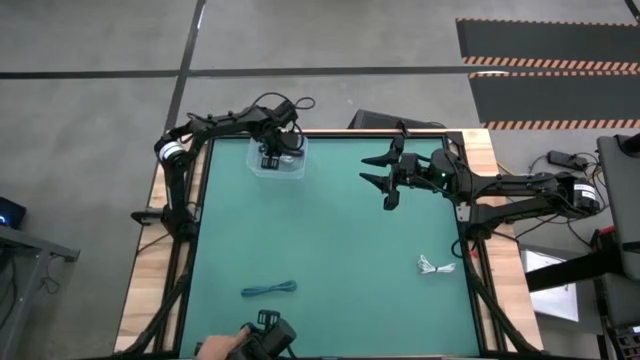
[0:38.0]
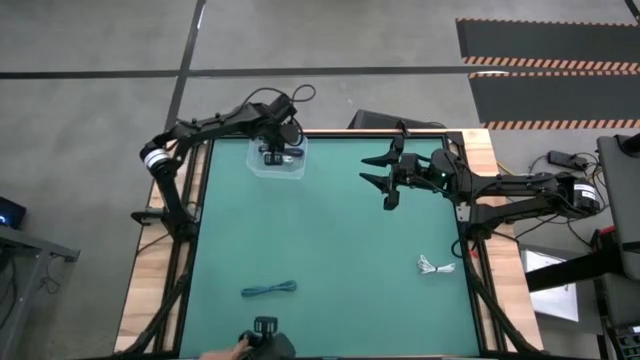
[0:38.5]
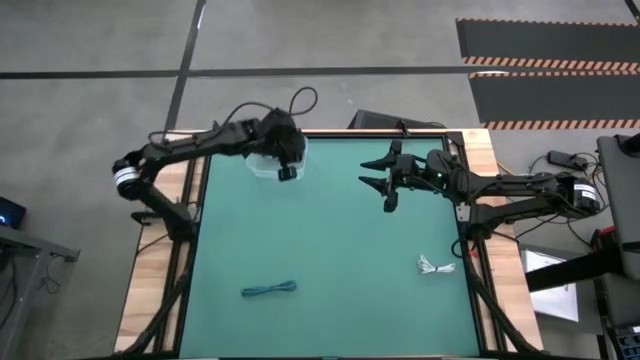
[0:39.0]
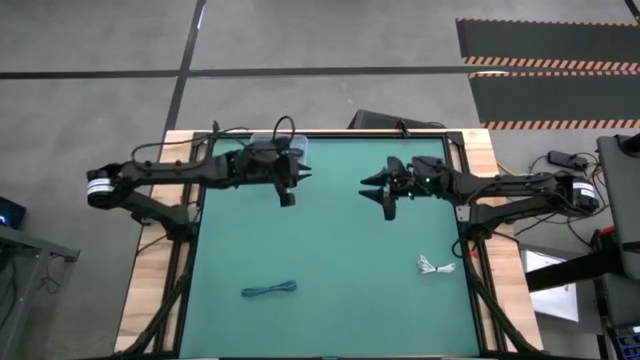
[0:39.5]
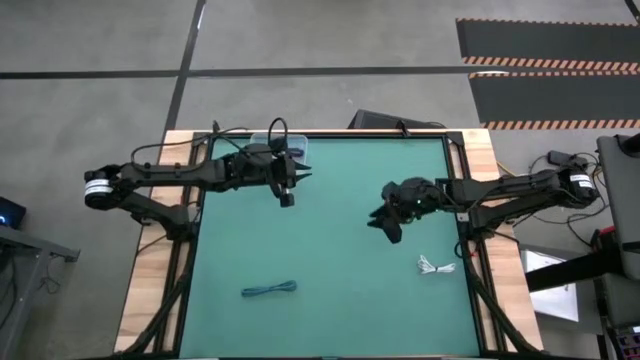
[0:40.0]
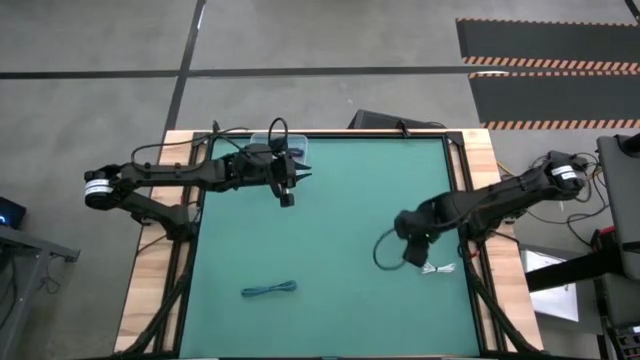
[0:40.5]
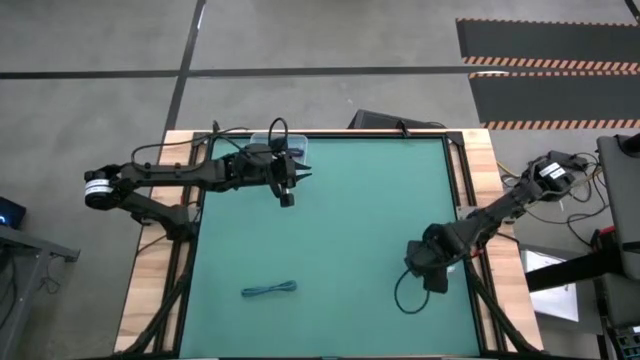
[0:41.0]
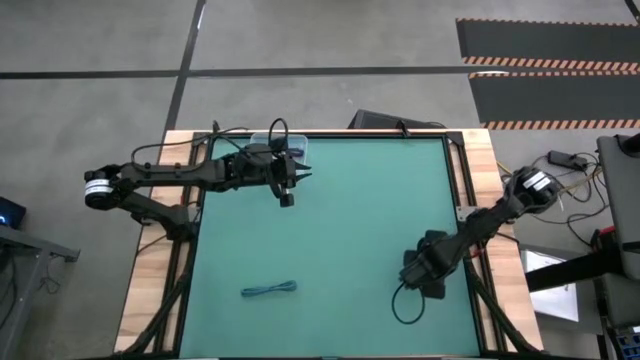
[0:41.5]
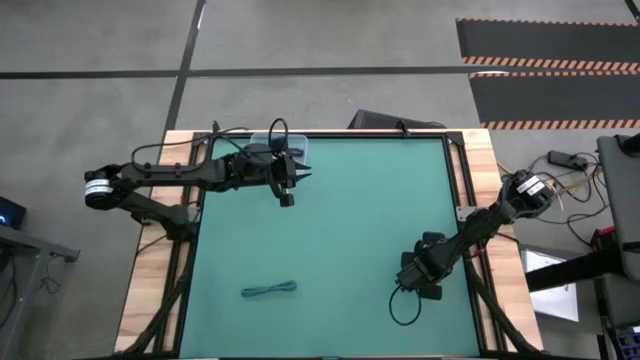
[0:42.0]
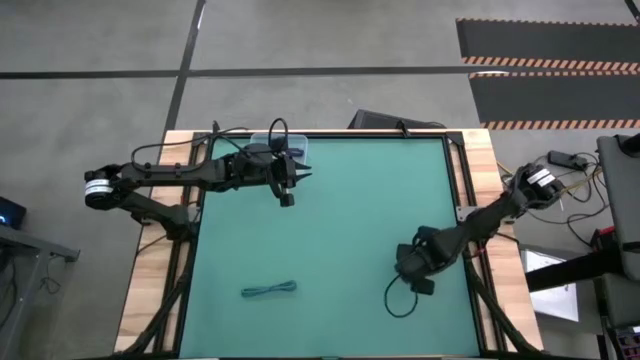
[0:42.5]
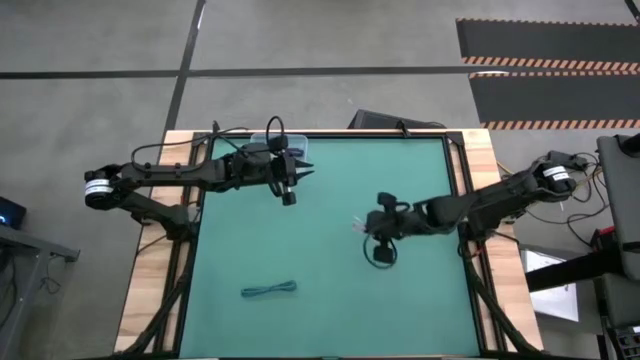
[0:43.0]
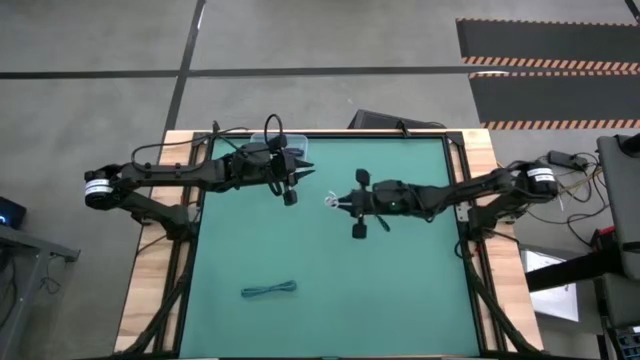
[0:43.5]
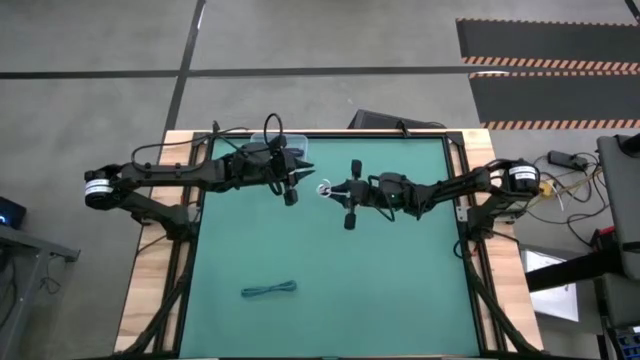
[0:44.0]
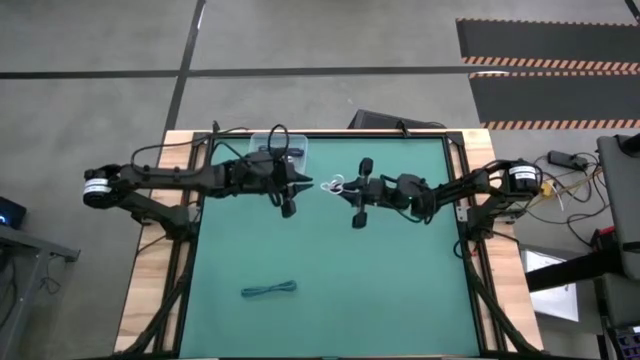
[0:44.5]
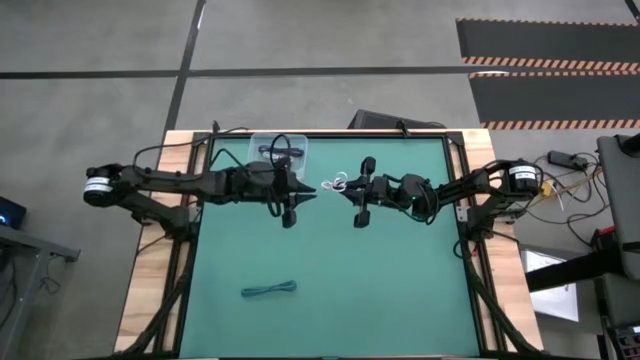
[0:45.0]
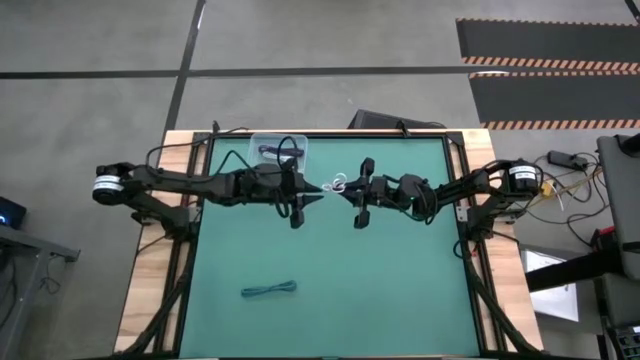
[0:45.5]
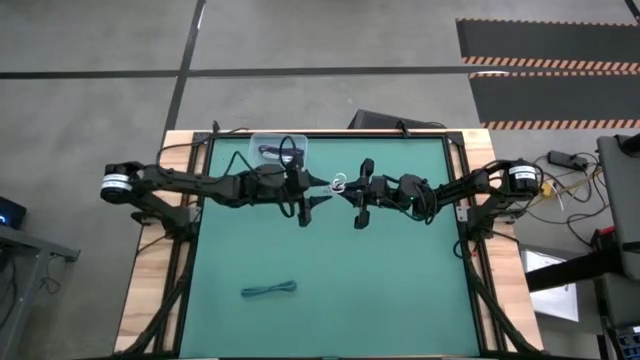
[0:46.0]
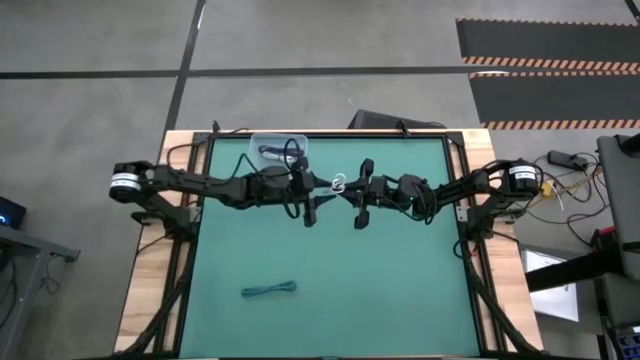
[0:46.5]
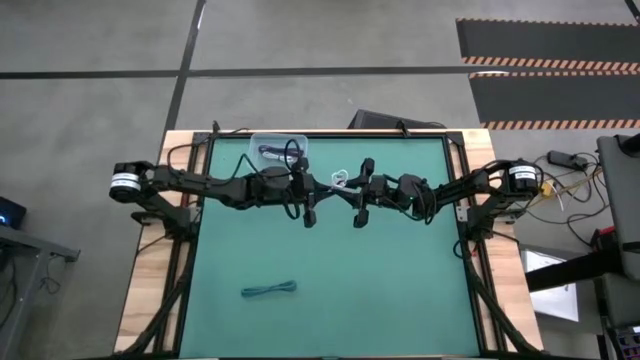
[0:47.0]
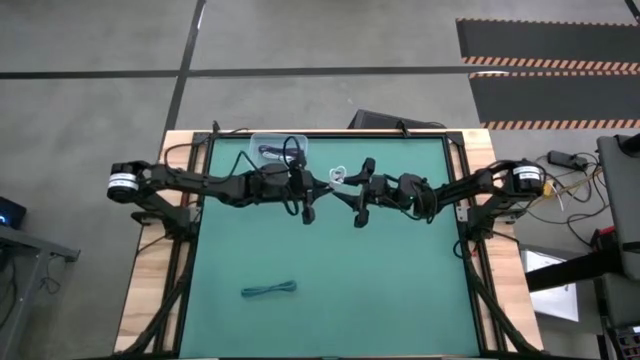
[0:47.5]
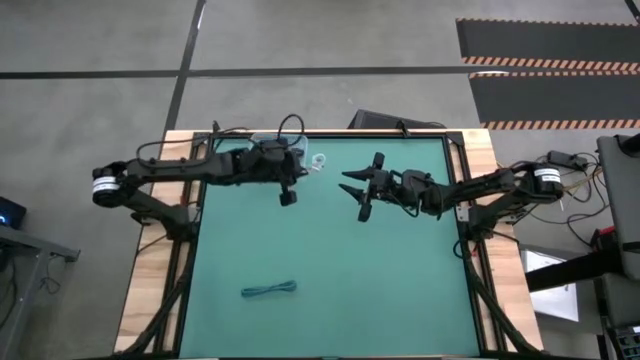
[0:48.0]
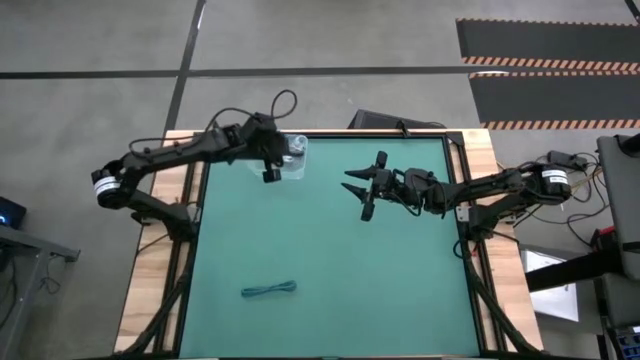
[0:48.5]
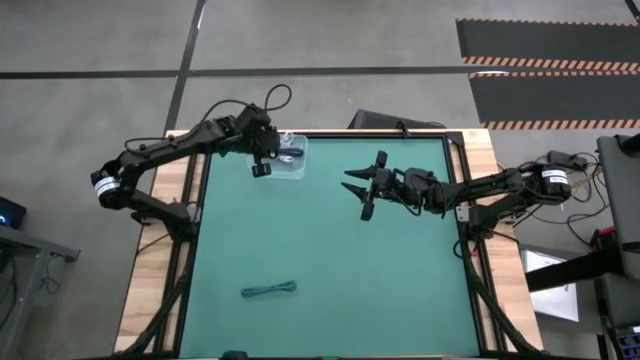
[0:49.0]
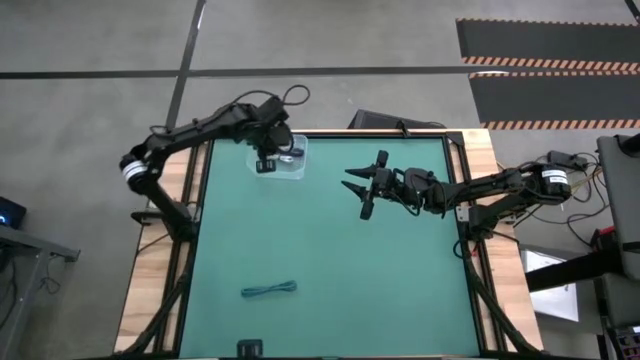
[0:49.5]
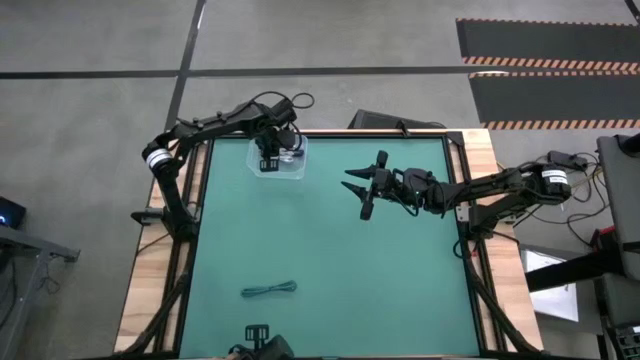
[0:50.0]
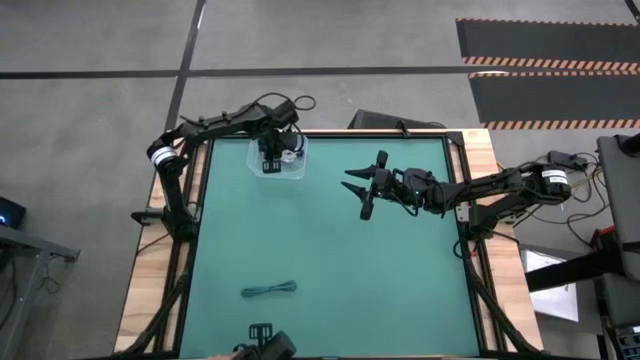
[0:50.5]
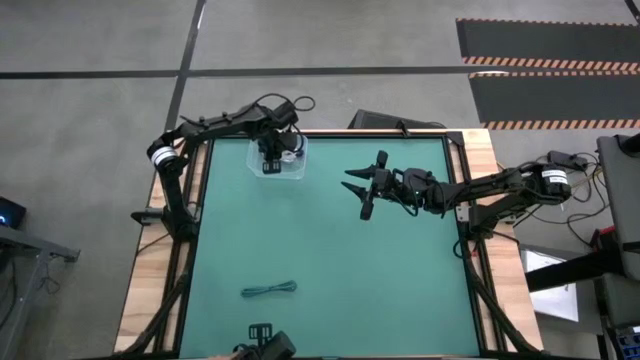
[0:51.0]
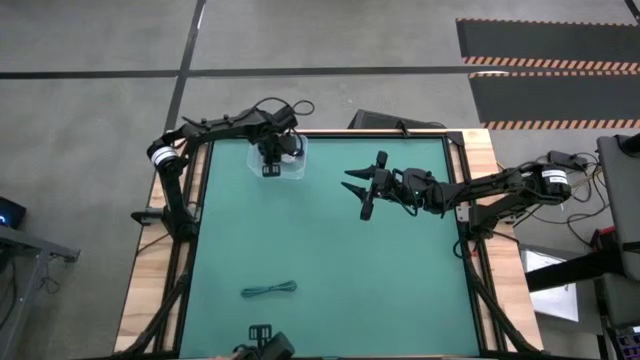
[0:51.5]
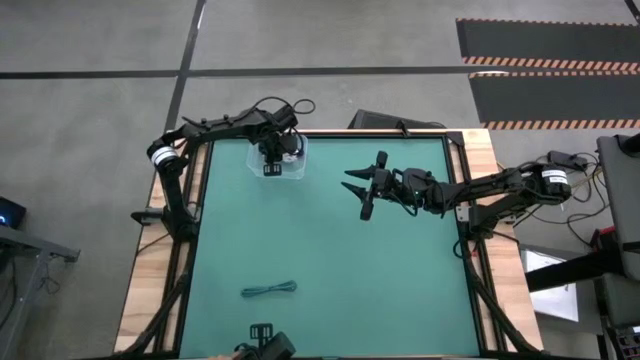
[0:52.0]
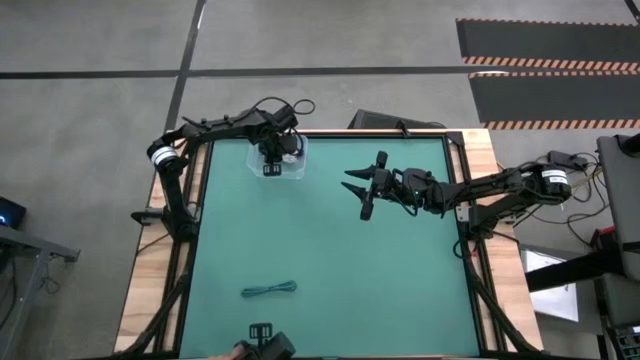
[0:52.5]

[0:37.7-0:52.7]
Task: Pick and place USB-C Cables
Put the white charger cable into the transparent bin

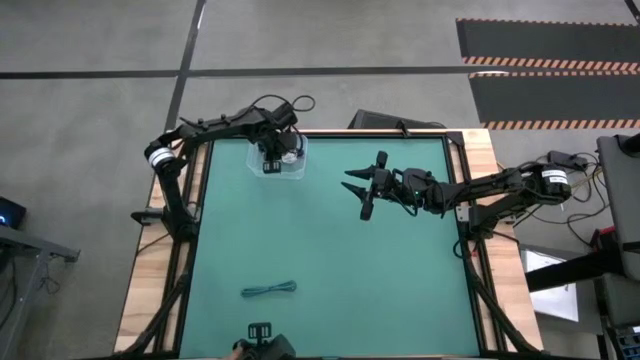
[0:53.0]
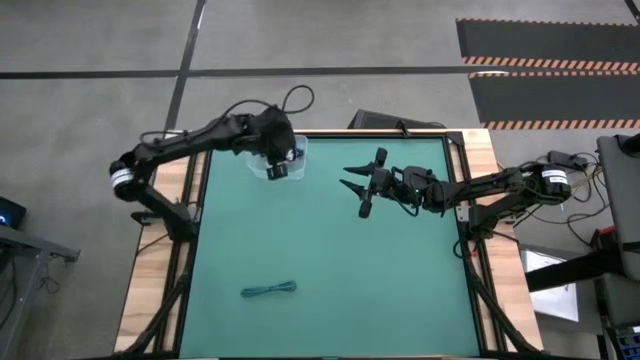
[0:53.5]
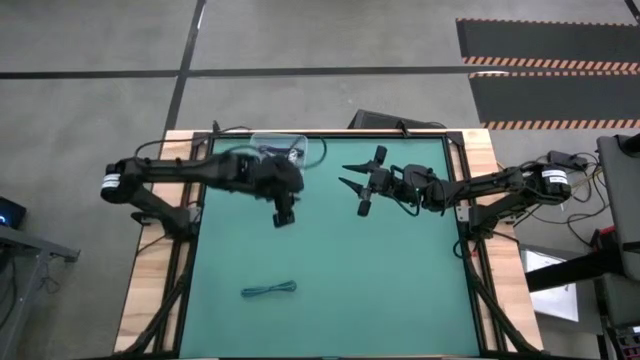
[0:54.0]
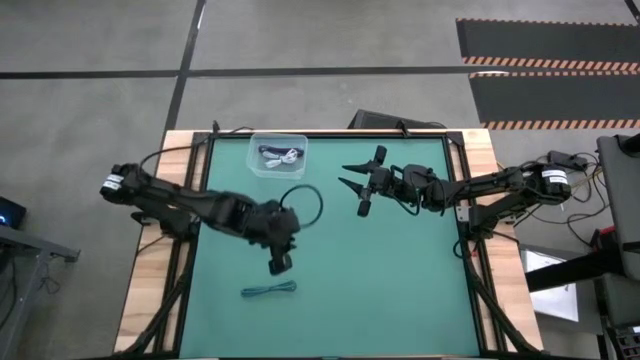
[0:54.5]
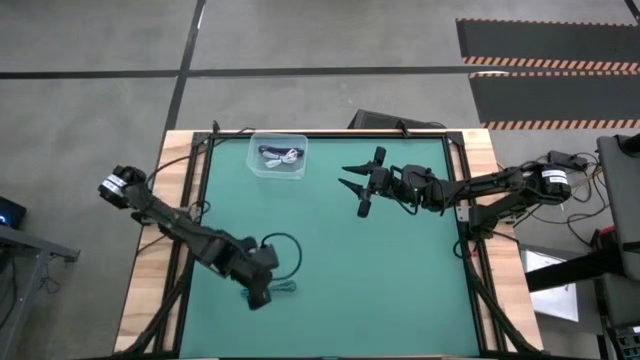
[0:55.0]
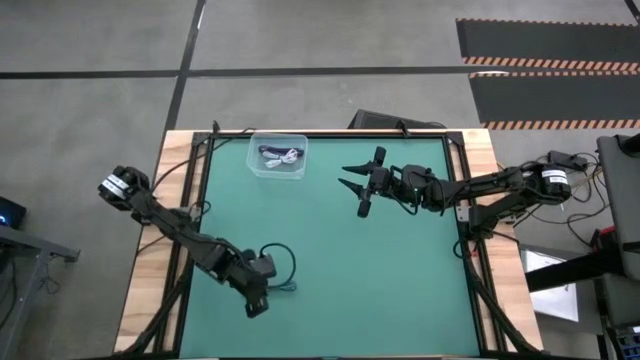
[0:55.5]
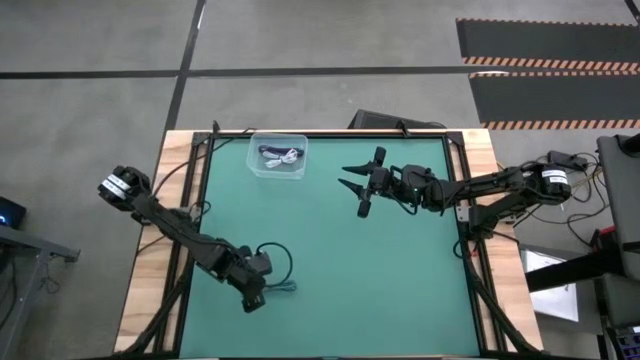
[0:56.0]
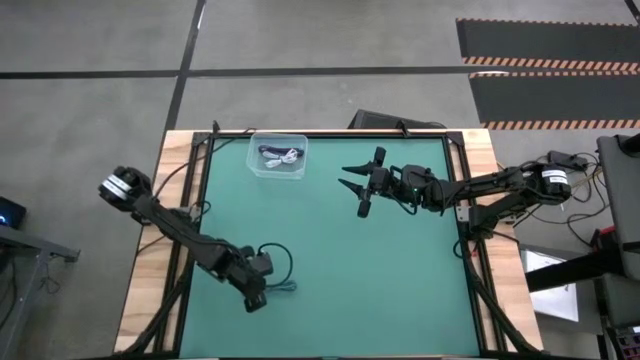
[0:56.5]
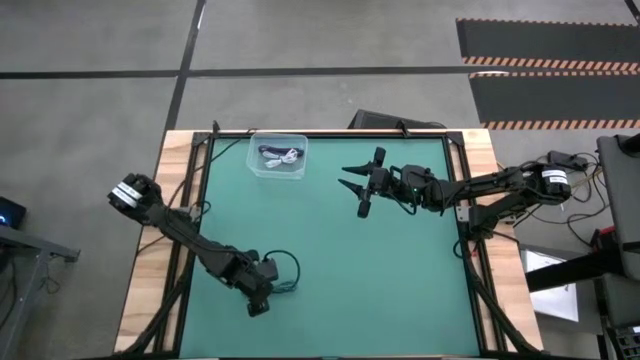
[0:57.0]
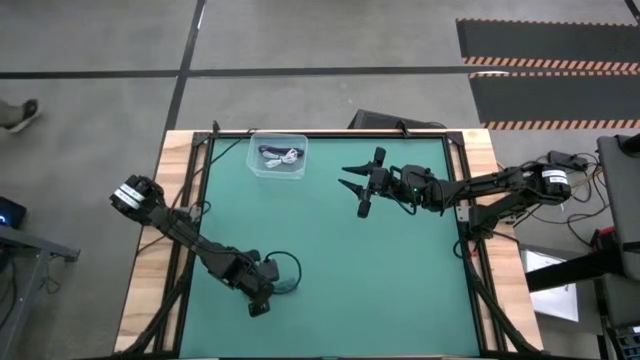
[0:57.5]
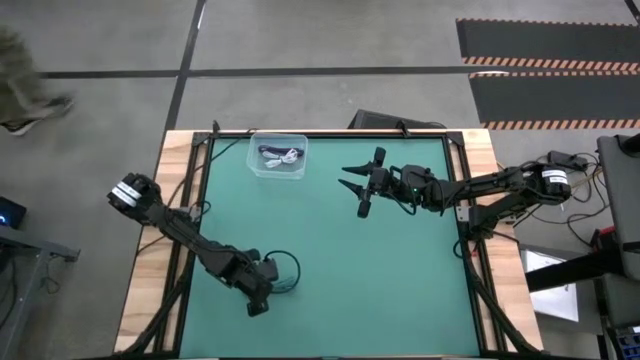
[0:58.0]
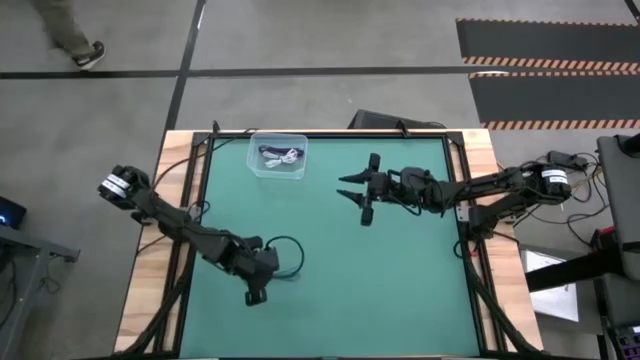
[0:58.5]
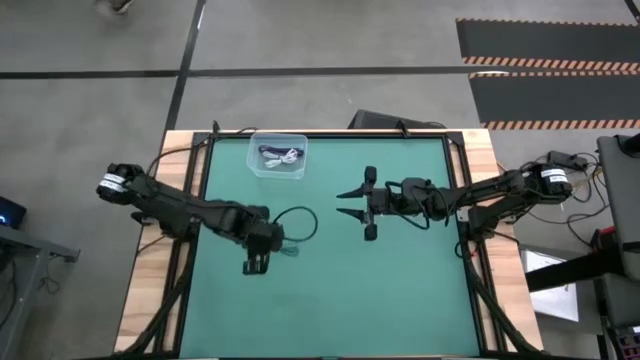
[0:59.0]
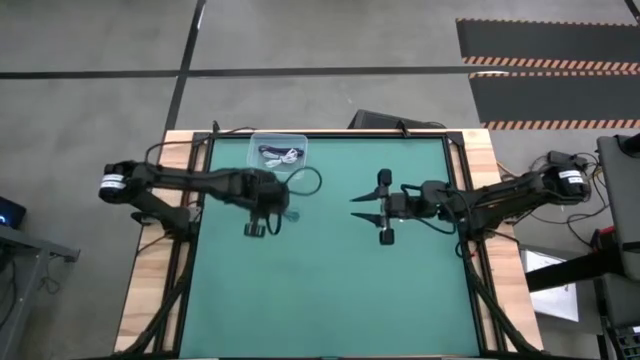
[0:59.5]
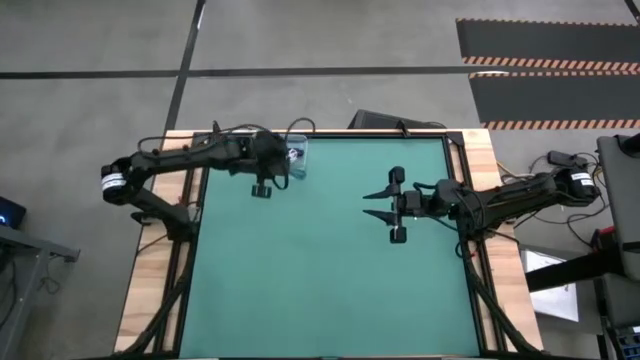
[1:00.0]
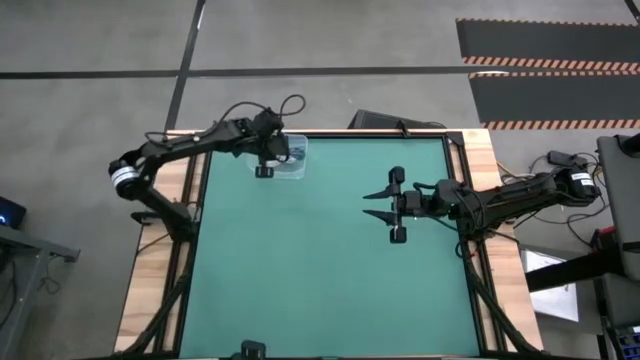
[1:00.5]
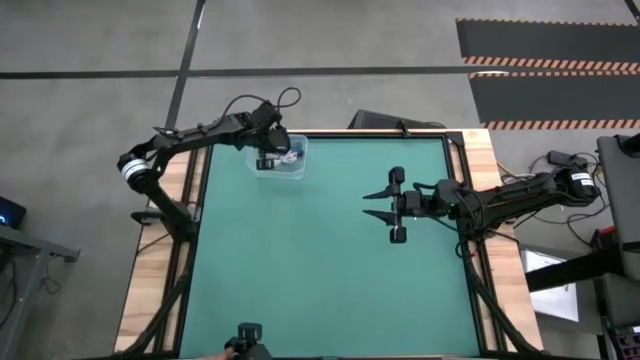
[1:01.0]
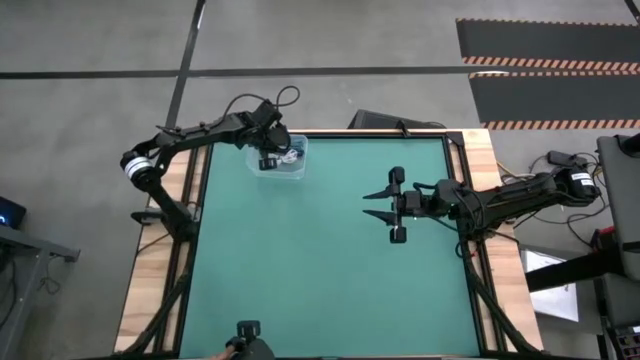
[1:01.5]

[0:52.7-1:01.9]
Put the blue charger cable into the transparent bin
